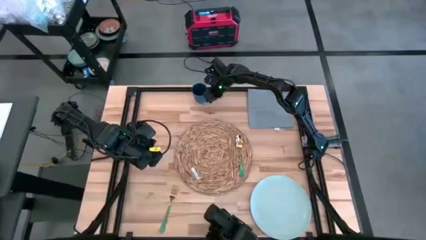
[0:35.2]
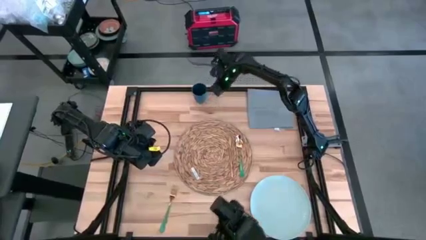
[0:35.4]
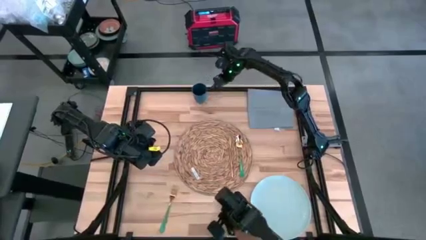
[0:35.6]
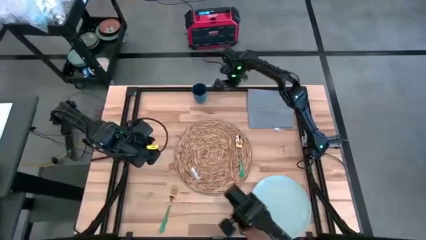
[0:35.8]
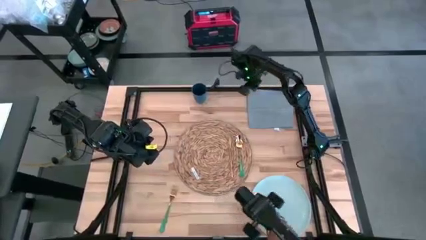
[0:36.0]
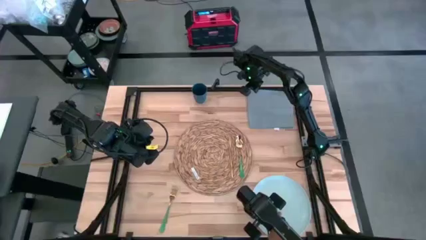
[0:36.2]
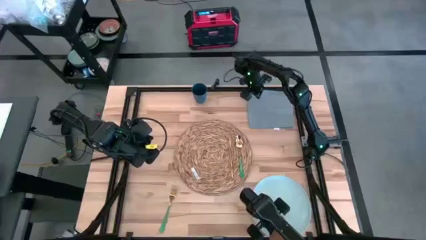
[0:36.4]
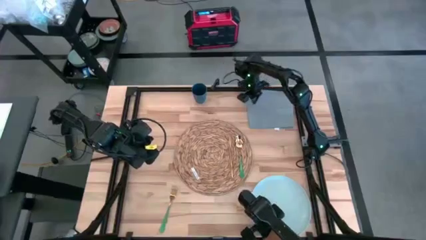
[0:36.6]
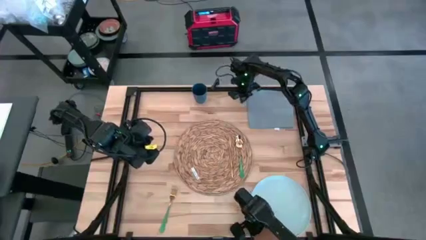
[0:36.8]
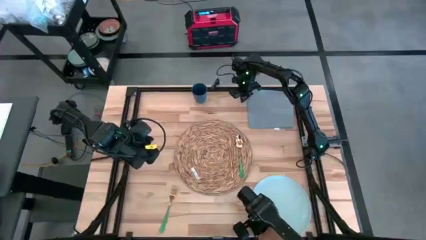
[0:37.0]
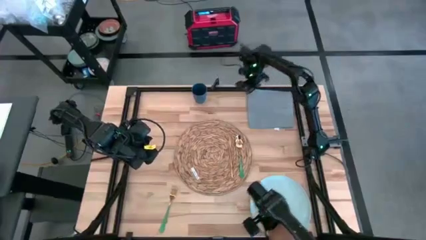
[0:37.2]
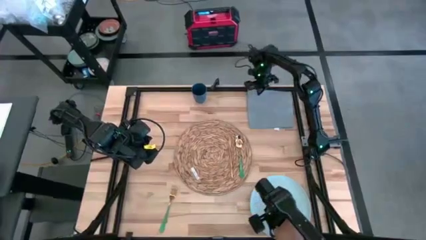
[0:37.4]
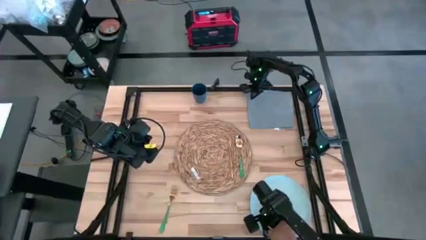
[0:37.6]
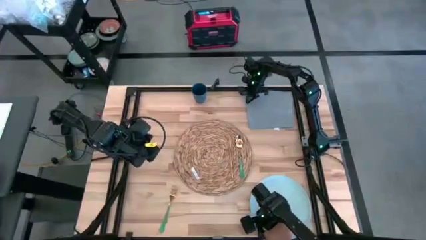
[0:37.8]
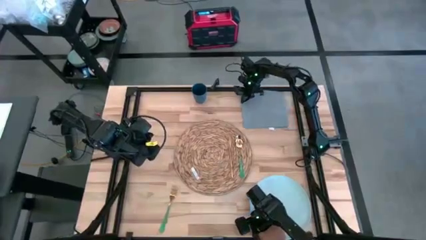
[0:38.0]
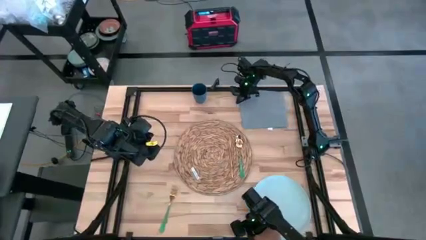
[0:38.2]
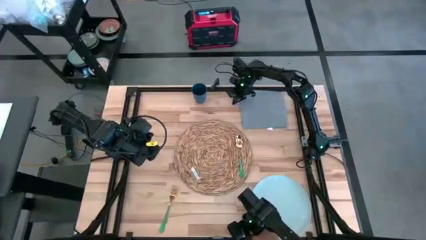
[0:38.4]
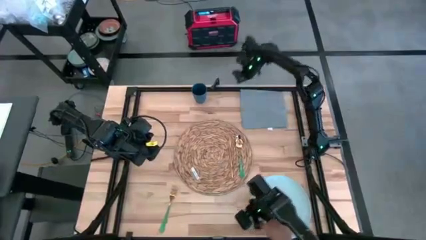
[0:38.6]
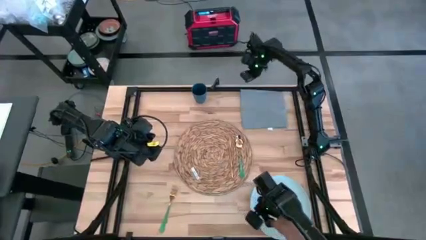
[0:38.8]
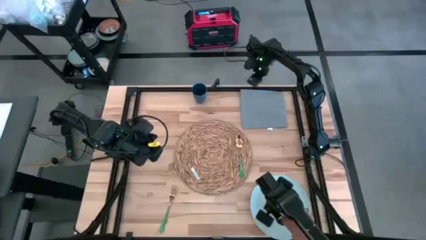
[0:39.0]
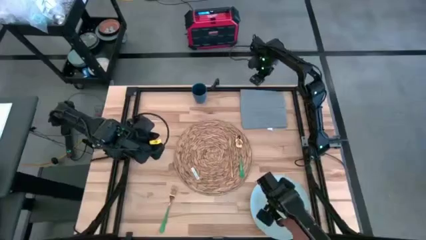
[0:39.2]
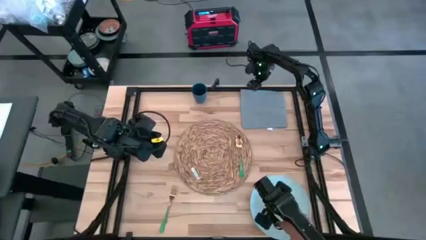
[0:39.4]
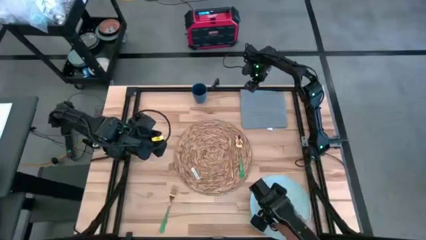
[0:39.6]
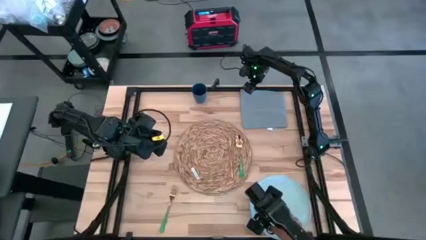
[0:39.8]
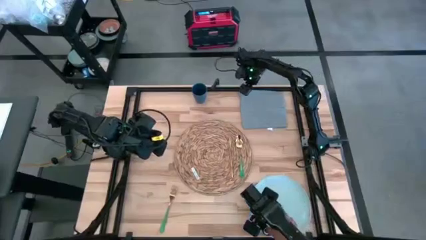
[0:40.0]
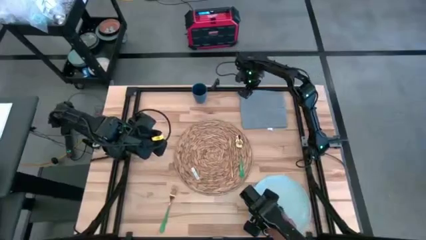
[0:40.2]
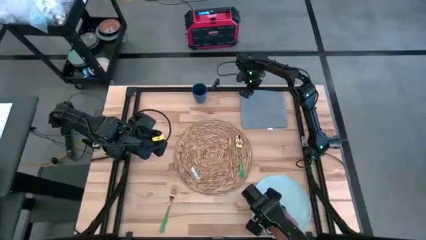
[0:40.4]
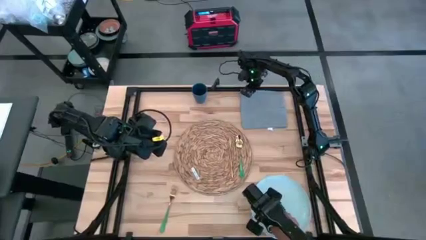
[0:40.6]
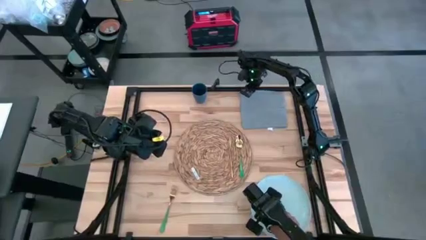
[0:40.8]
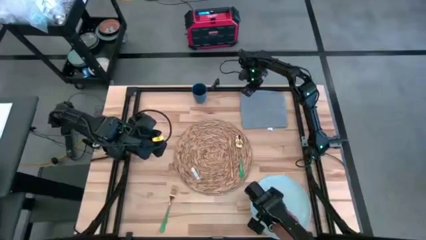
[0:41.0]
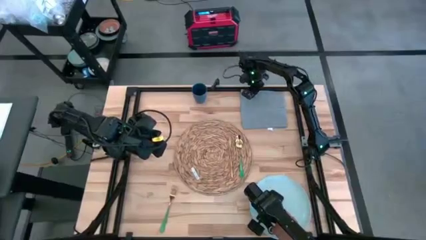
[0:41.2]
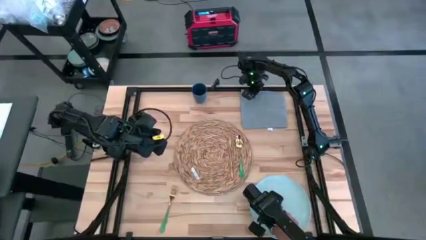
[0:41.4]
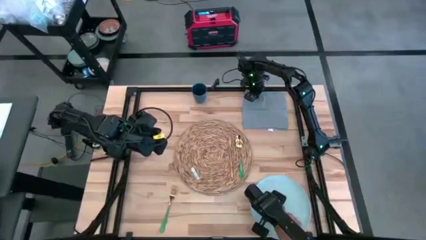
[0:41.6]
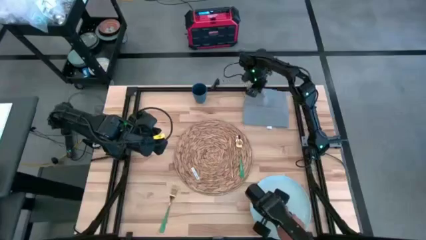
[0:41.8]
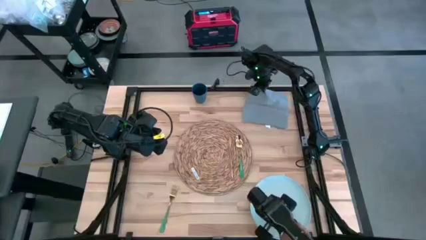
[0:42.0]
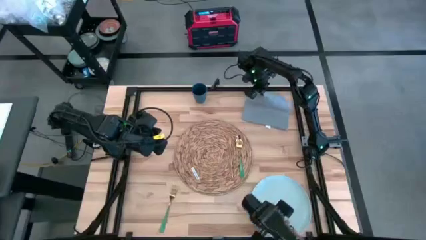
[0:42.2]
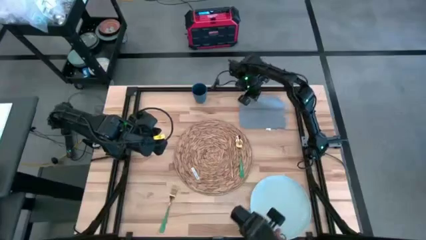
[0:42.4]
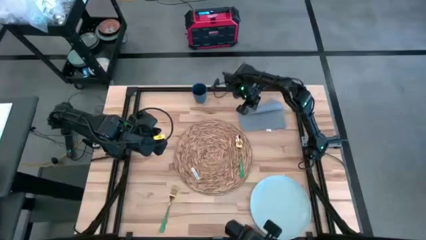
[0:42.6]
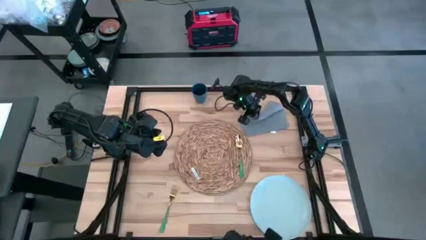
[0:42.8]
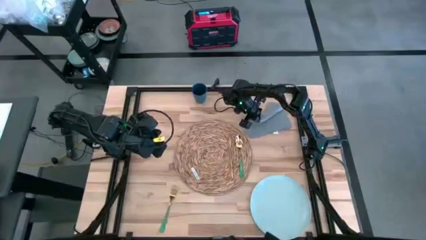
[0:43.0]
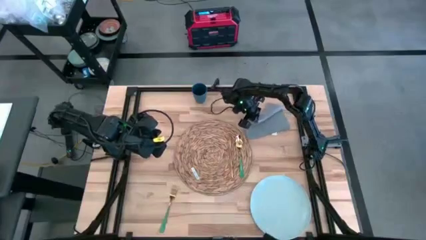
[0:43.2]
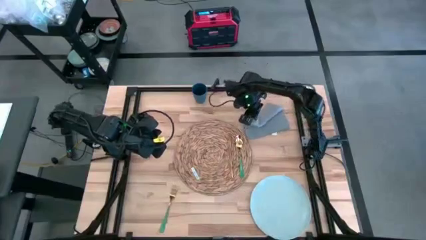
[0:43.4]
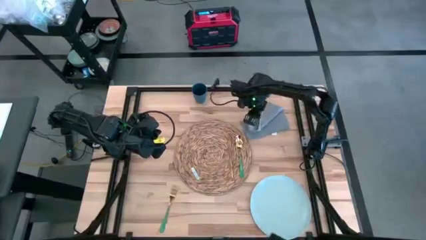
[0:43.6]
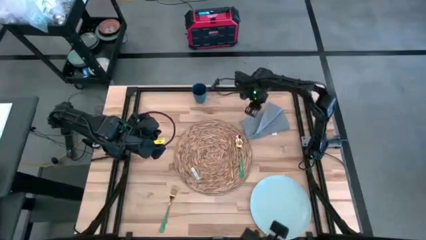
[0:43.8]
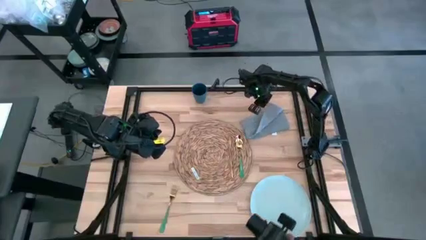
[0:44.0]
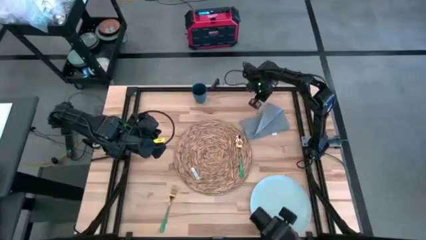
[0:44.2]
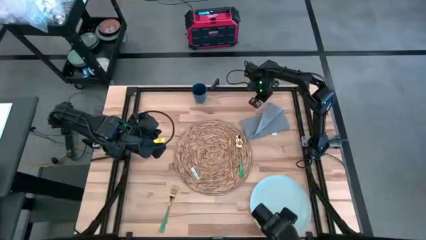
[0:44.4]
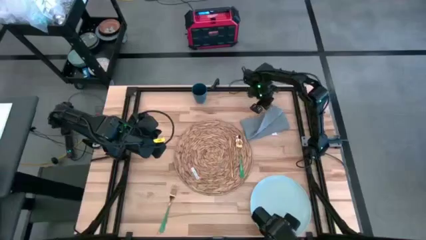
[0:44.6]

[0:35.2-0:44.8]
Task: Set table place
Fold the gray table napkin

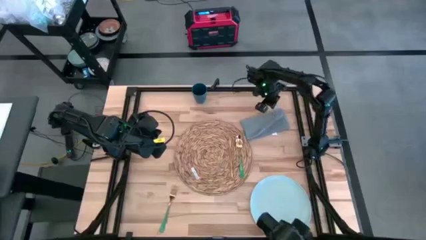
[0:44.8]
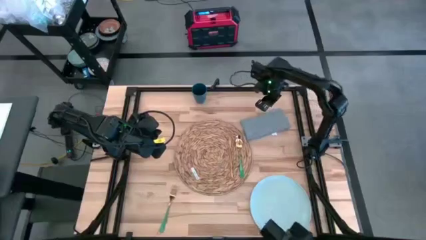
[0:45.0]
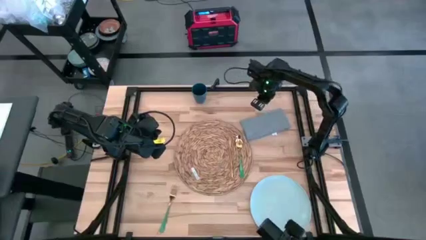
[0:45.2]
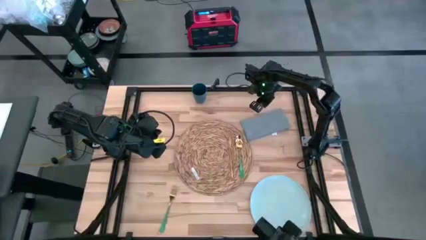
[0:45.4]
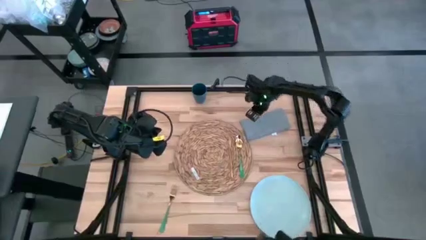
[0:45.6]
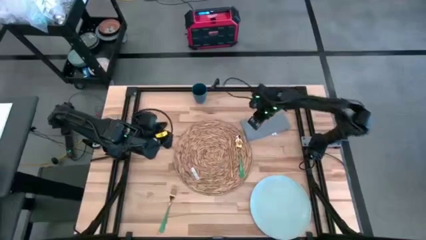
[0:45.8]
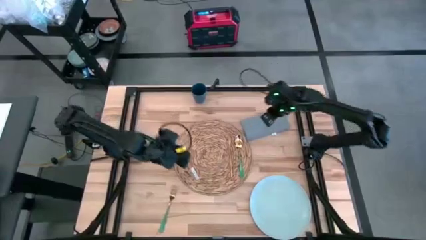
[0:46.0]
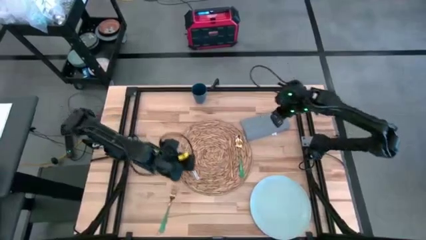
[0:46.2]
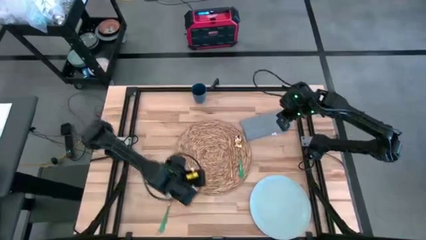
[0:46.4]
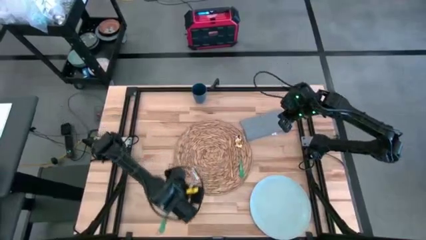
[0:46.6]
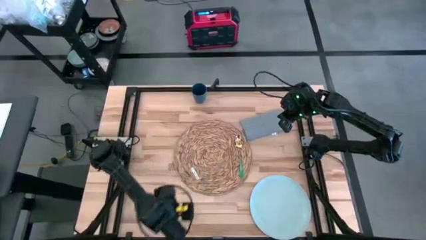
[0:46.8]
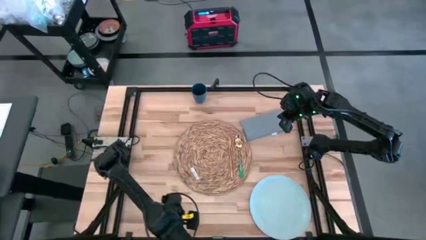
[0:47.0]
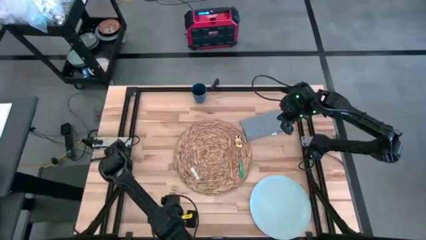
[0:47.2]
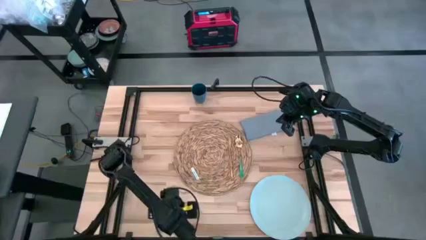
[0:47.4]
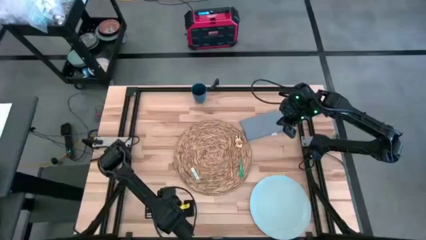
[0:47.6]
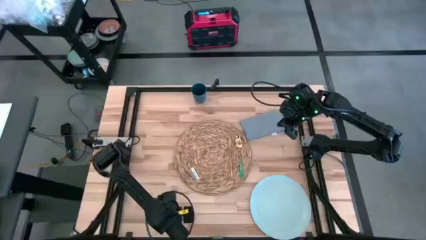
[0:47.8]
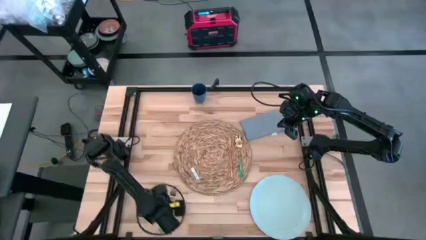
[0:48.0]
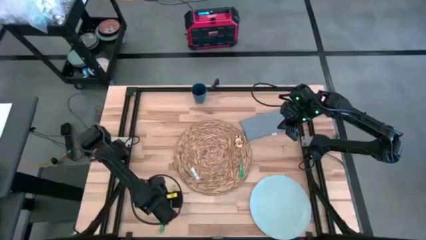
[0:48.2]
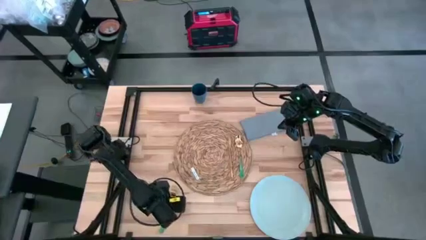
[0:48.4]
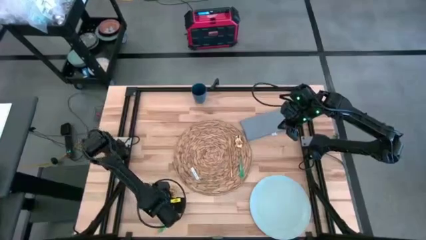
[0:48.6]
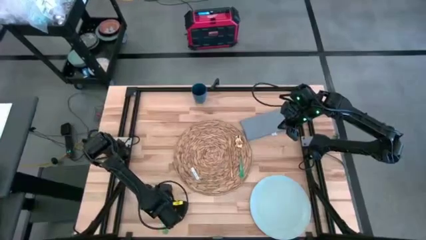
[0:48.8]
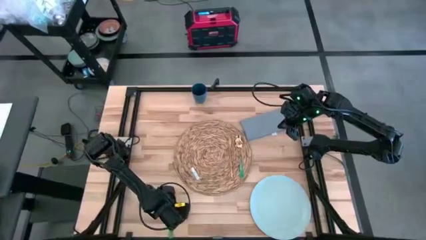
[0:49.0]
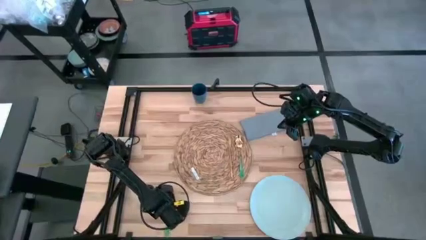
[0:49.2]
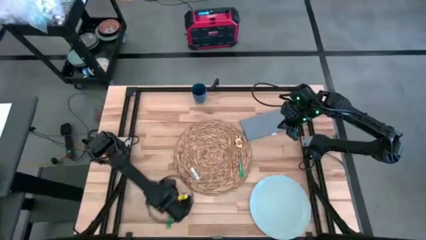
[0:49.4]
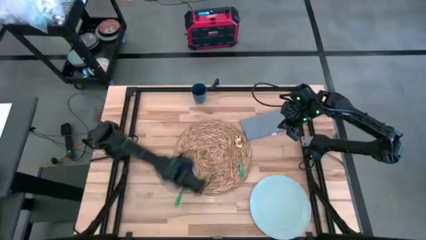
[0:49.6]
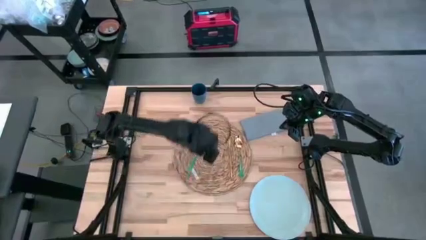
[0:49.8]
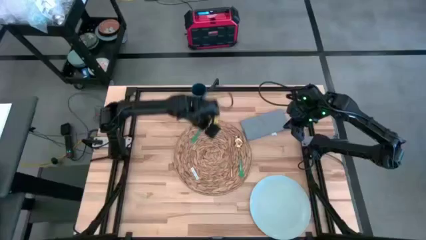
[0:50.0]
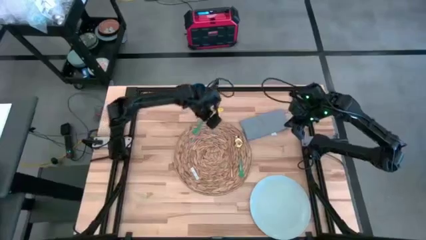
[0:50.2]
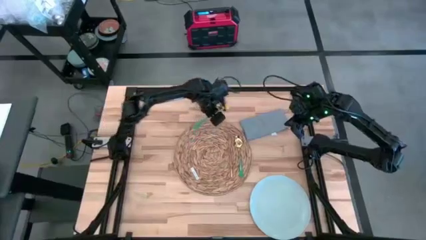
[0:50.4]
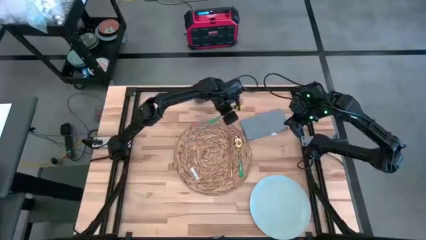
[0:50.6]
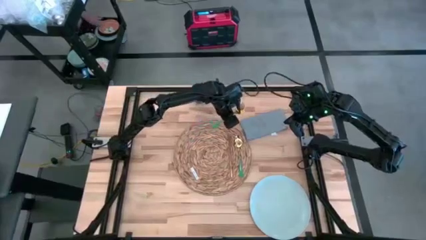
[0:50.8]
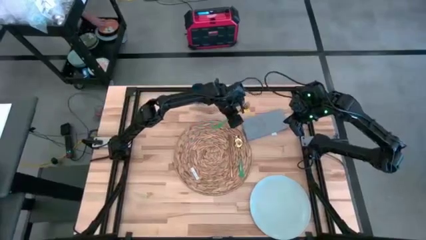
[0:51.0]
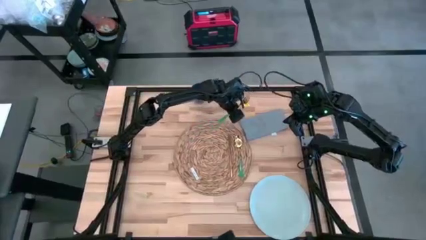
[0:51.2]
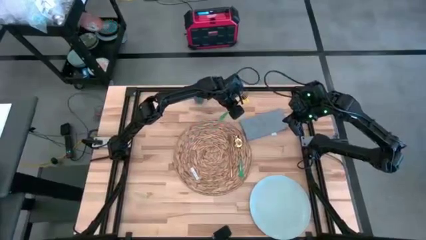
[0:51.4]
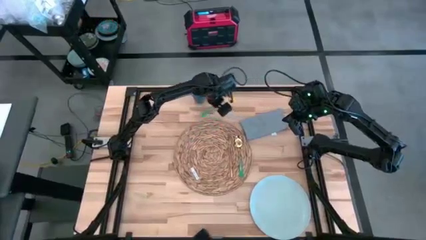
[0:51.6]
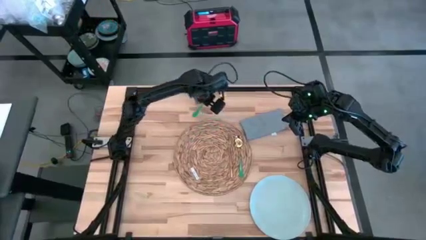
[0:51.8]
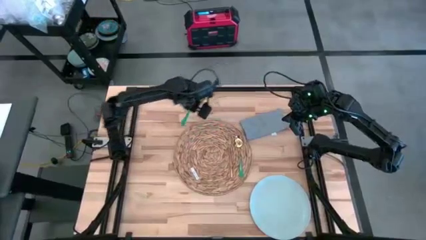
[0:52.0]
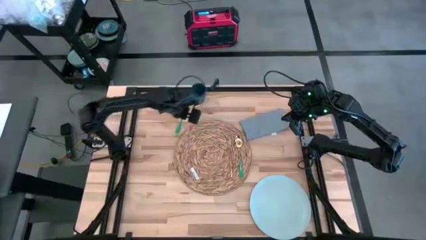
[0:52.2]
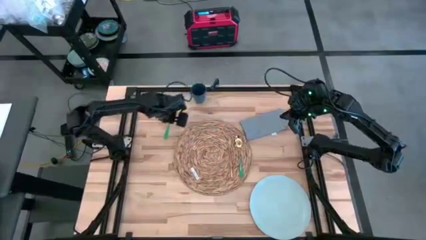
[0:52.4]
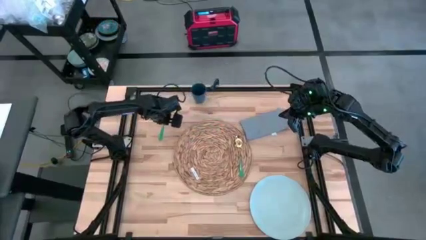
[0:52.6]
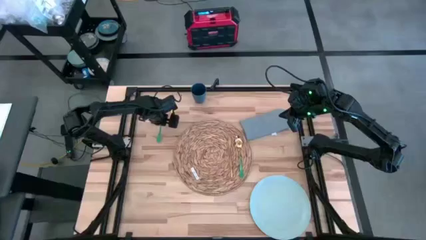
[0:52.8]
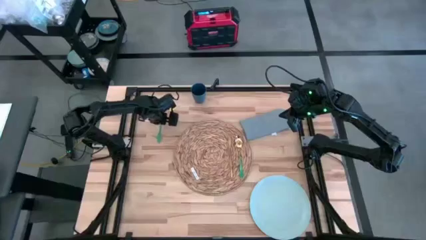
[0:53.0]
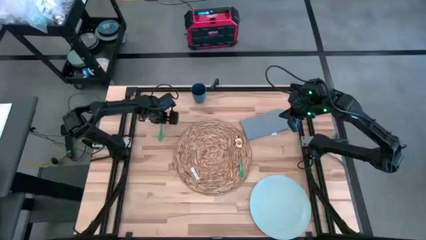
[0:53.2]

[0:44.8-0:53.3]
Move the green fork on the top left of the table
